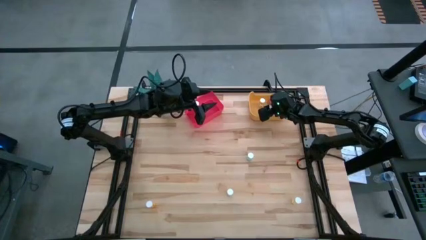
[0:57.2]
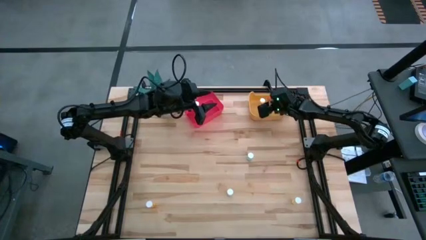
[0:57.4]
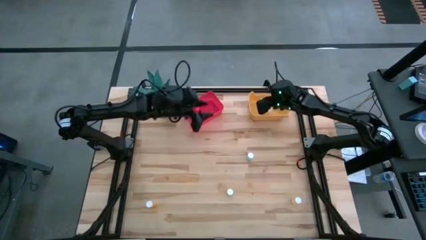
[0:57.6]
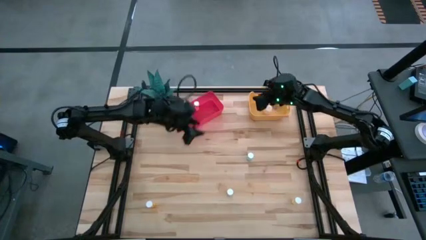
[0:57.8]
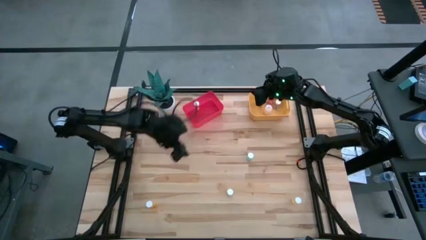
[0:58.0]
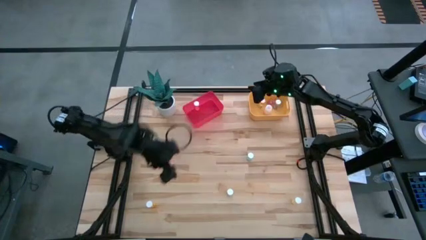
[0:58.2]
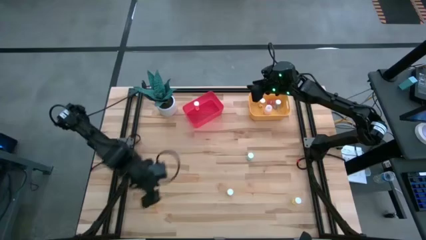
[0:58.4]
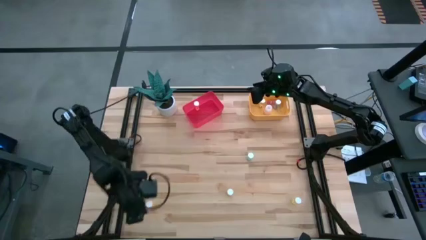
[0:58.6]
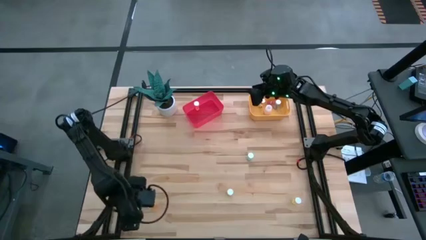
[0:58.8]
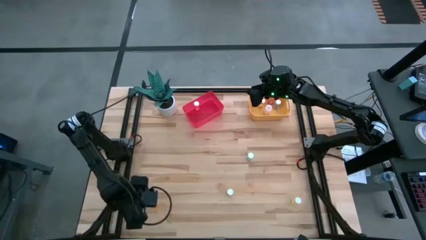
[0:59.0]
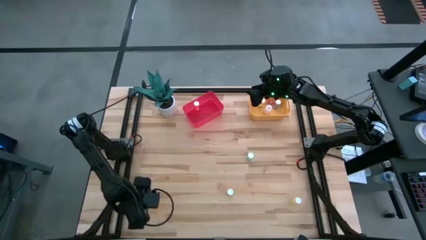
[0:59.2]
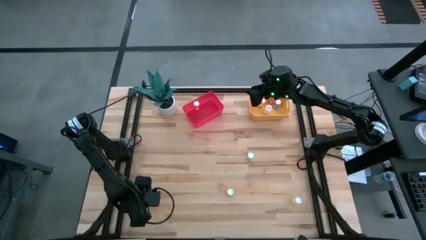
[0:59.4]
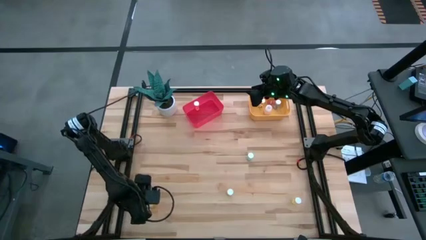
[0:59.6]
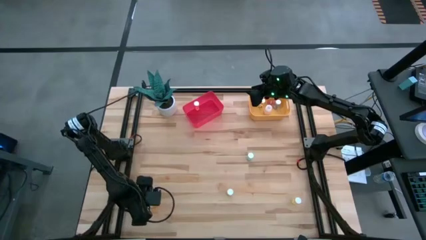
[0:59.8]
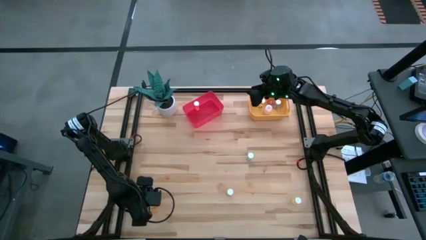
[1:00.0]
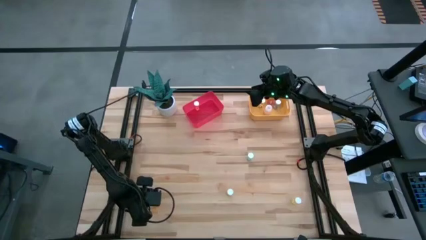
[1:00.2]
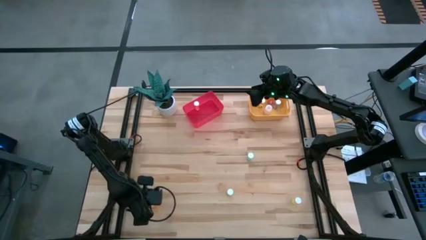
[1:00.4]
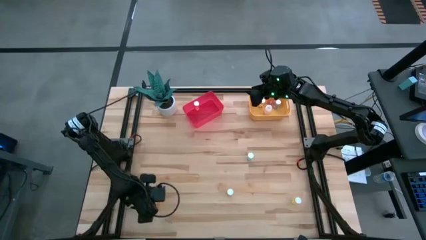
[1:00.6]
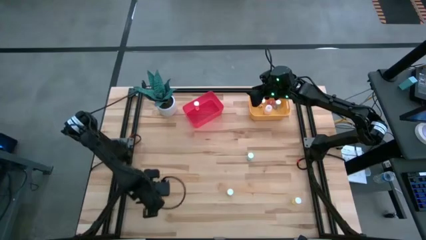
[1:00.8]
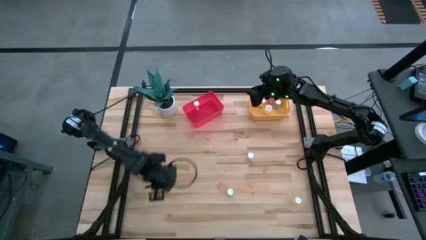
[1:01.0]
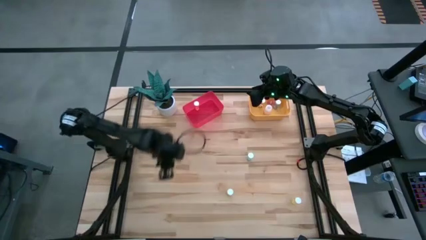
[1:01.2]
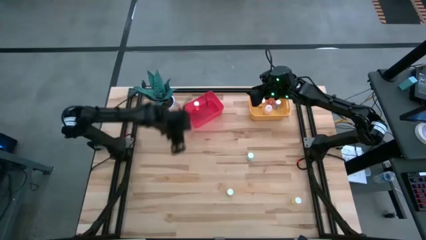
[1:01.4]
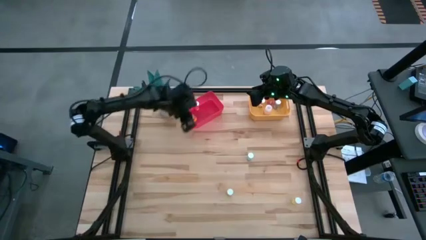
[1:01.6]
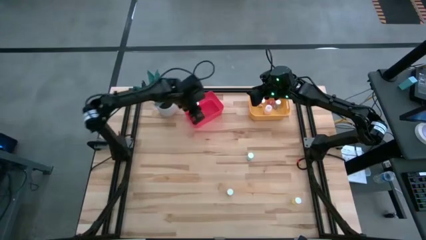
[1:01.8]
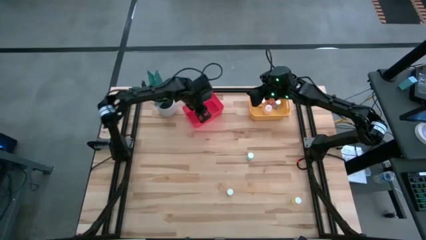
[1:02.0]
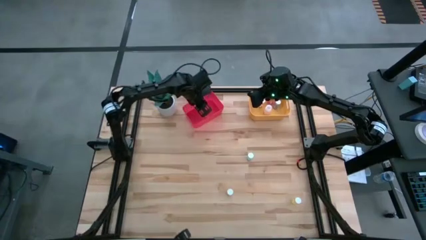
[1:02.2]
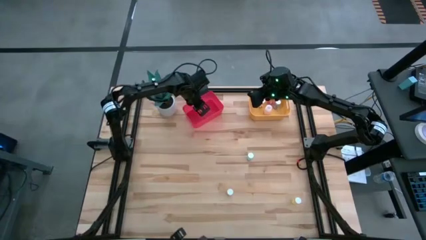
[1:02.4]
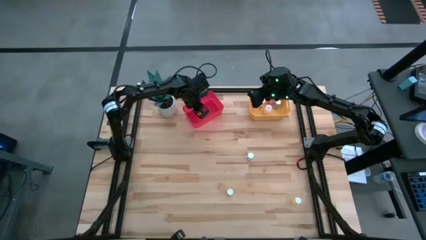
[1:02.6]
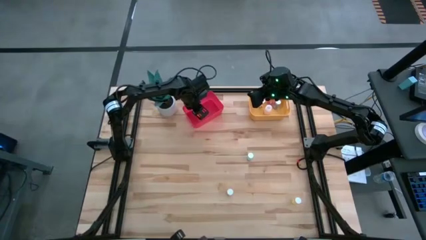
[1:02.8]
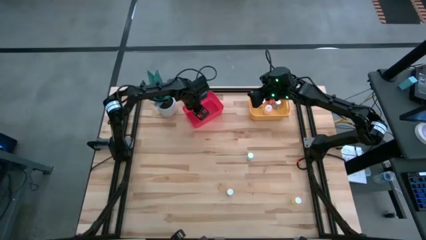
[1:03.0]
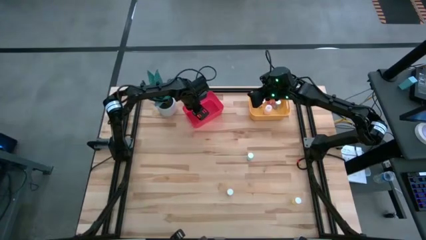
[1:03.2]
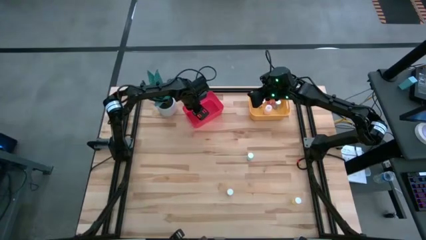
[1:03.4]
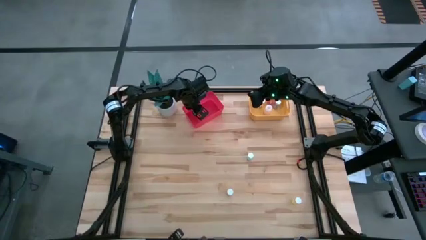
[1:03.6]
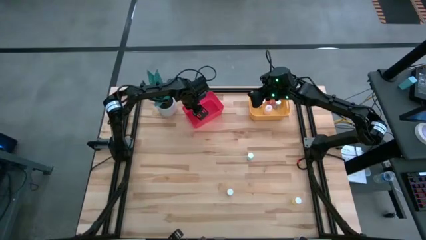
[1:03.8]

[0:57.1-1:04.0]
Task: Pick and place medicine bottles into bin by pill shape (circle, oval)
Put the orange tablet bottle into the pink bin

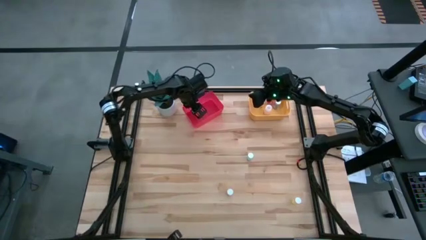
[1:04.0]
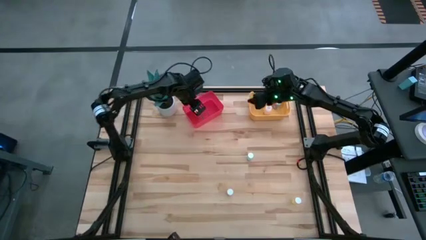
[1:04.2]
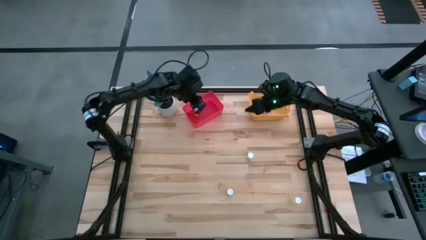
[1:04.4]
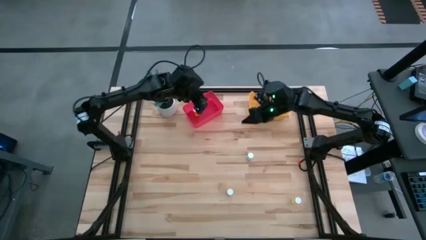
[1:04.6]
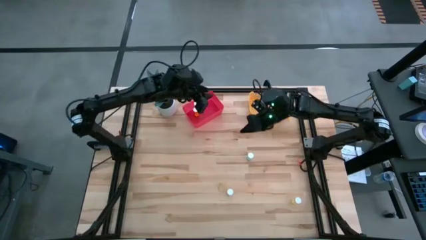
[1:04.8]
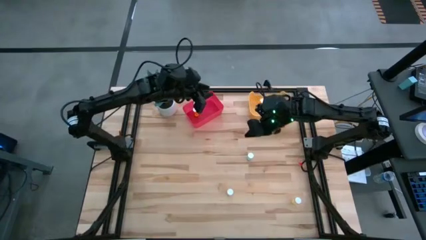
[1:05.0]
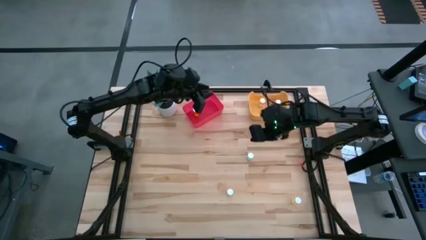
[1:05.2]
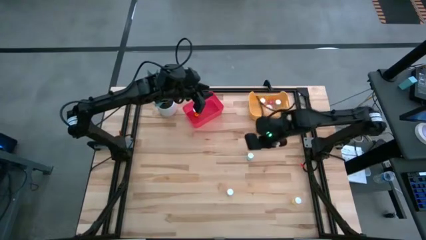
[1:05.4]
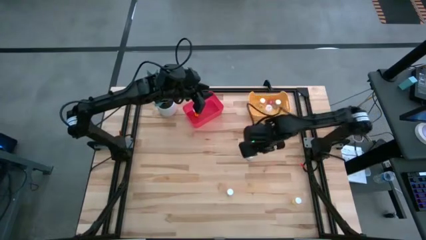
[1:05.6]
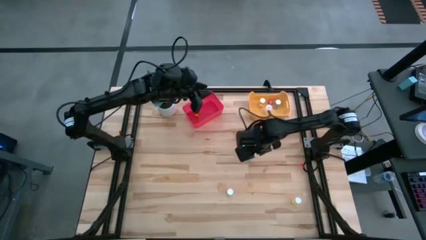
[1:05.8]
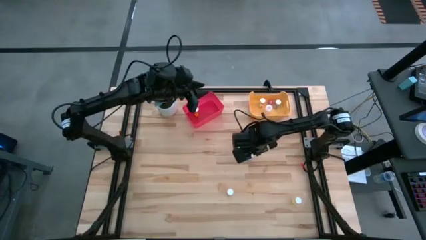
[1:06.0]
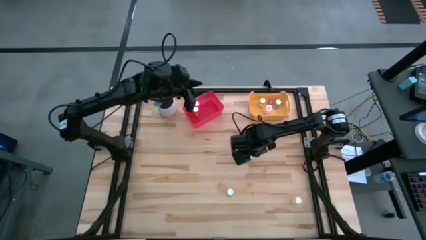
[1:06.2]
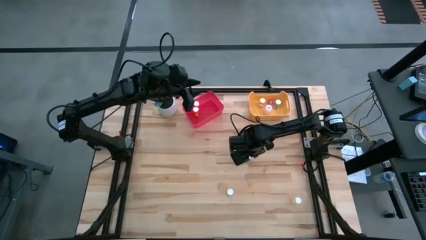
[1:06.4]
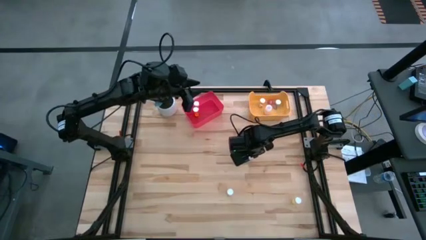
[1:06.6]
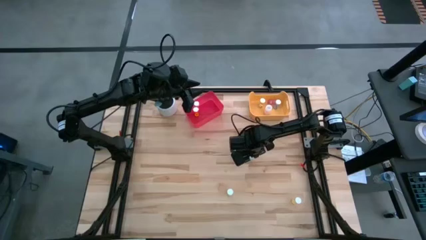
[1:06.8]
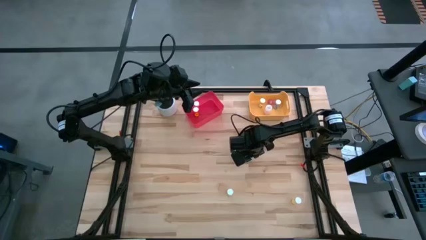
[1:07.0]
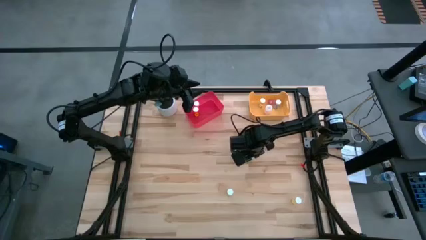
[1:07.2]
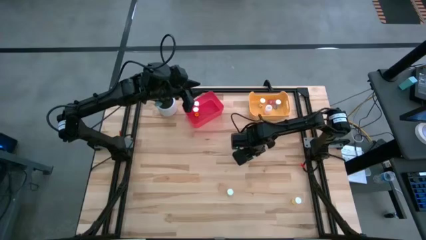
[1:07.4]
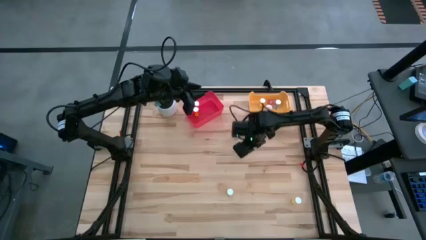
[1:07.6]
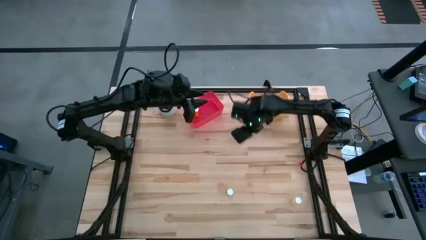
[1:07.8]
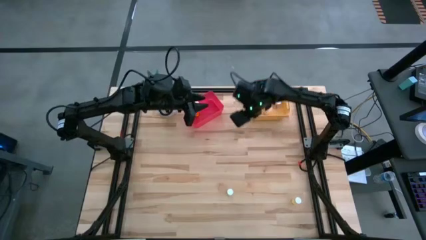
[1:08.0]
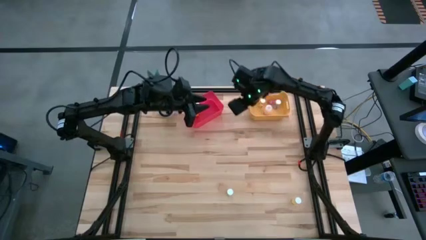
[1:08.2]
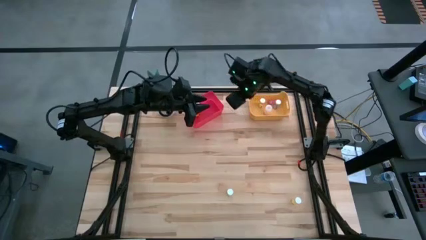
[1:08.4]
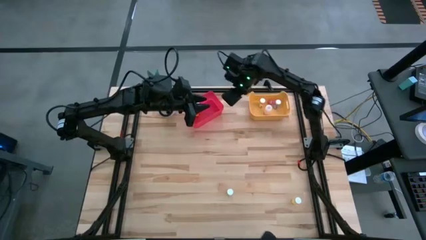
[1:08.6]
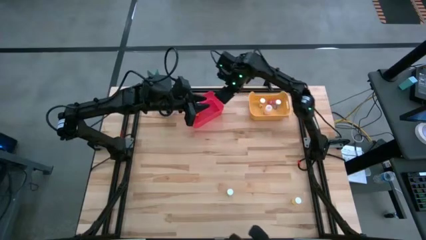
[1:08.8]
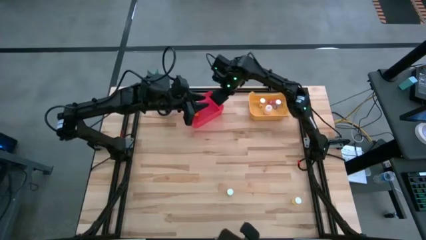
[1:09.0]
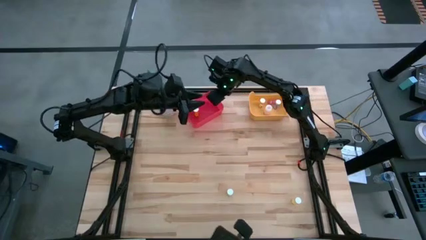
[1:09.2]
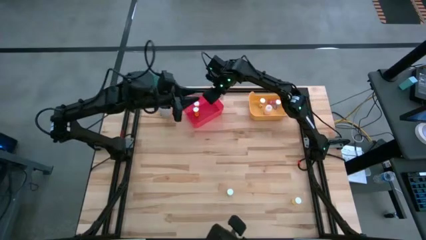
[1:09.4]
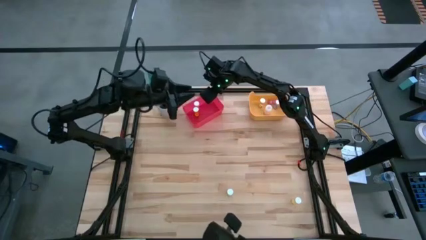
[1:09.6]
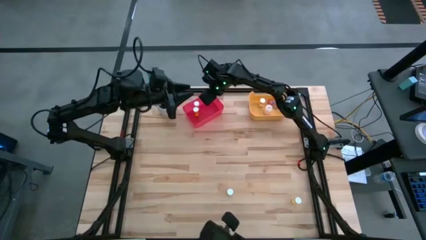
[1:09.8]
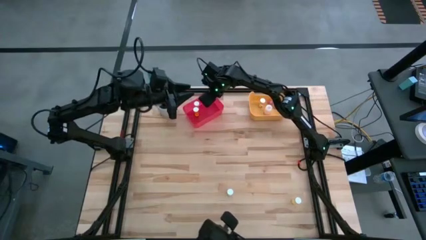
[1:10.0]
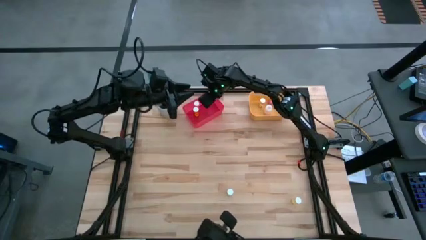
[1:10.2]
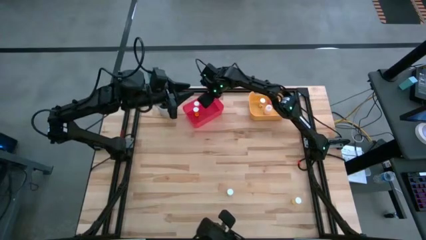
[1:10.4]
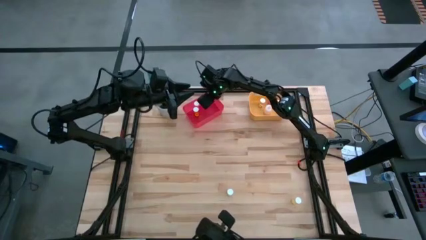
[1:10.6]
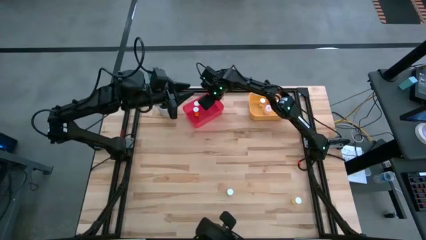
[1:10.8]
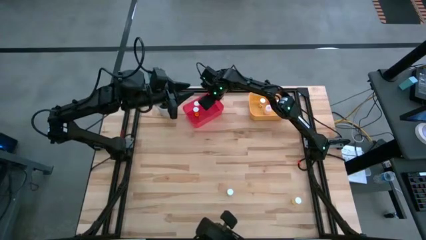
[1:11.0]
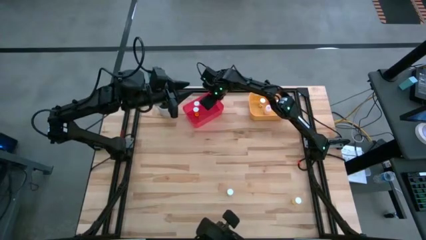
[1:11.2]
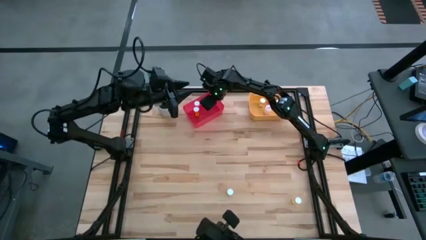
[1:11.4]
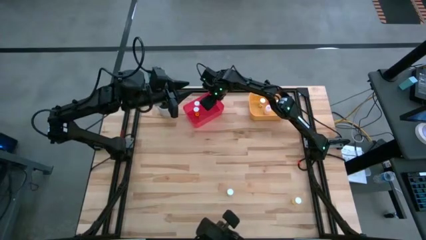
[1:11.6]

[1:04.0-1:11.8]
Put the green tablet bottle into the pink bin

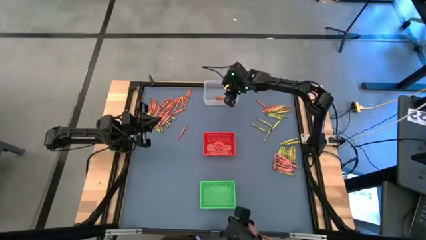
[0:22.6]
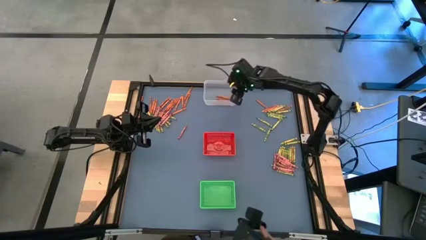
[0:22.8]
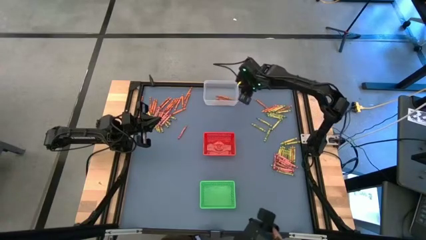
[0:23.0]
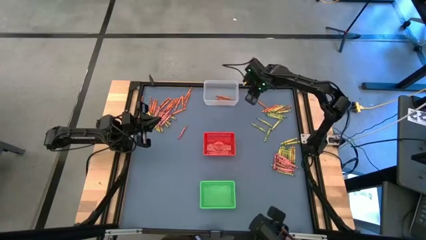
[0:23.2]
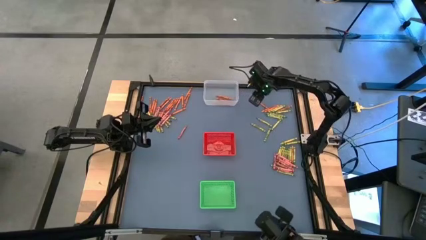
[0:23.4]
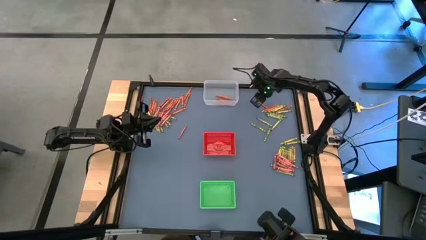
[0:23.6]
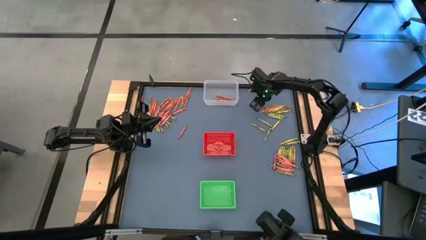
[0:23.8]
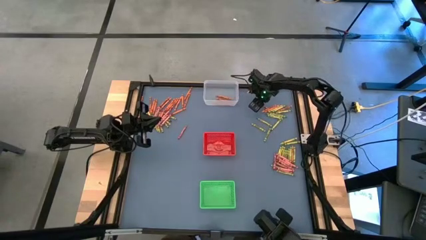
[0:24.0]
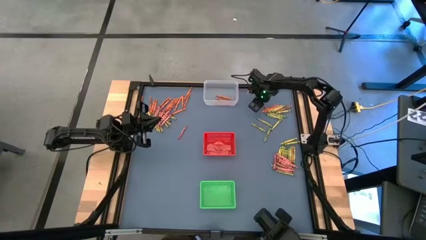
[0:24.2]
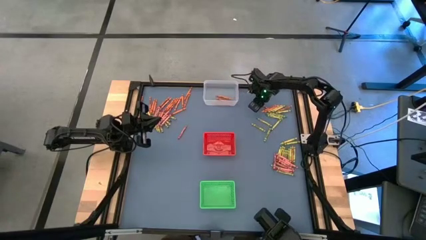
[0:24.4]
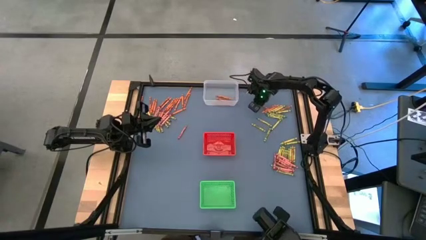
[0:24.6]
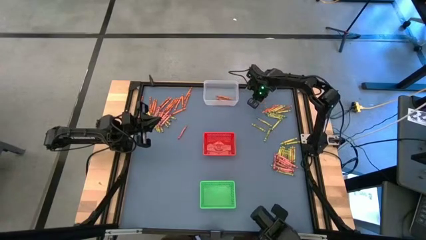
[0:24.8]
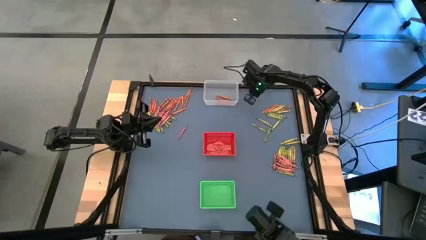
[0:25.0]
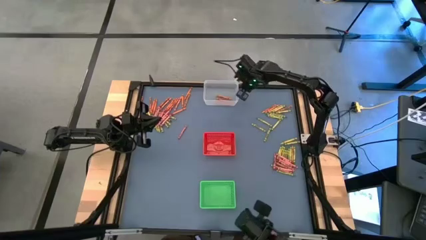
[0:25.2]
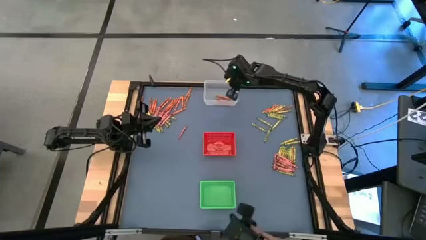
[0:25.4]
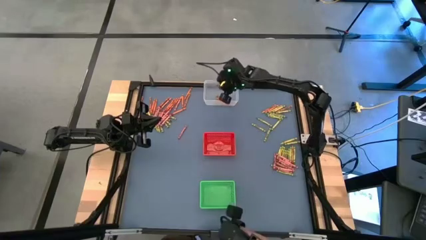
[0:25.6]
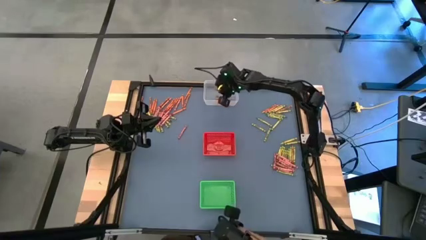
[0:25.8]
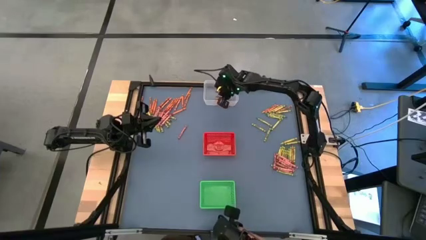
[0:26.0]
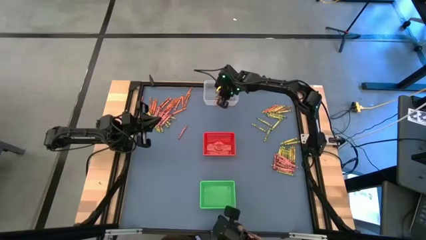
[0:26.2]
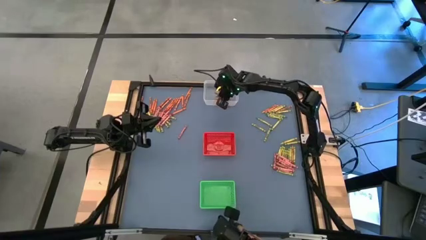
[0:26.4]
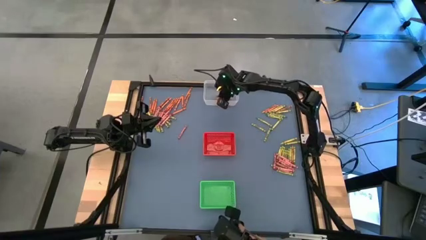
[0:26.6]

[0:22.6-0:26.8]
Task: Sort crayons
Put the orange crayon into the transparent bin
